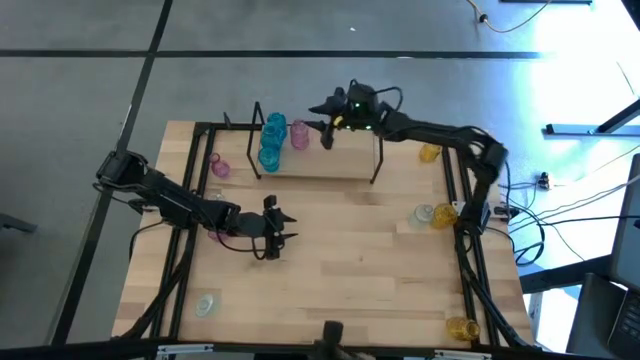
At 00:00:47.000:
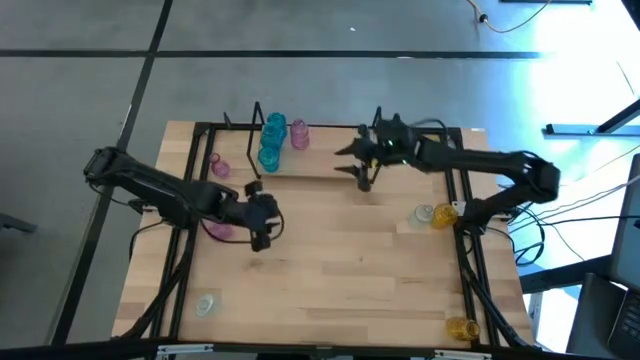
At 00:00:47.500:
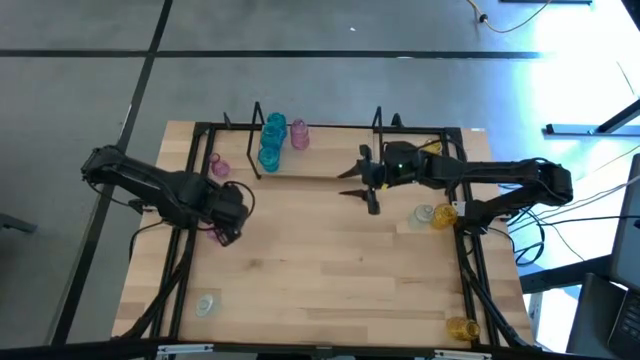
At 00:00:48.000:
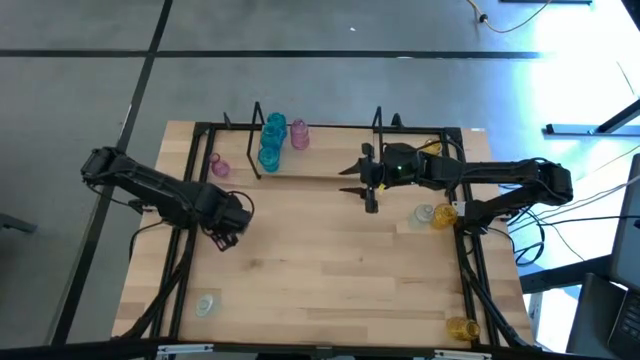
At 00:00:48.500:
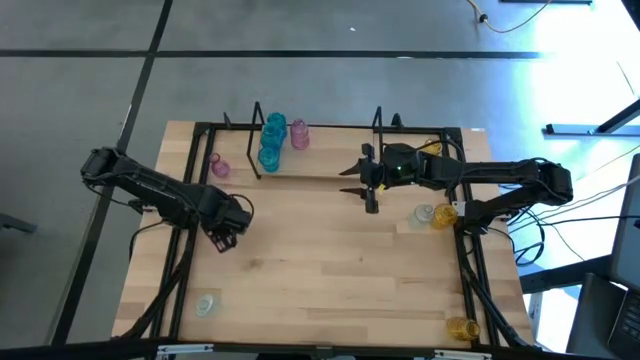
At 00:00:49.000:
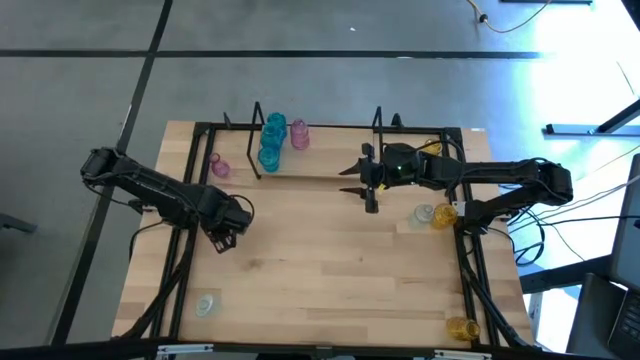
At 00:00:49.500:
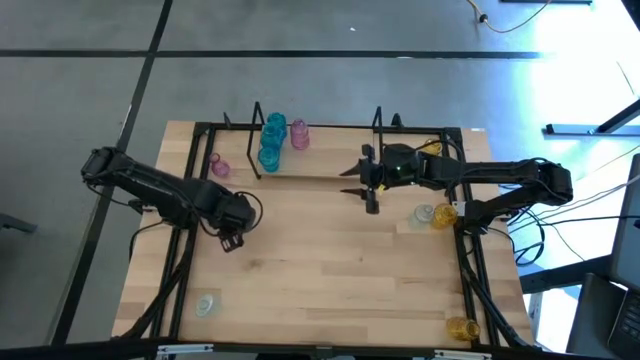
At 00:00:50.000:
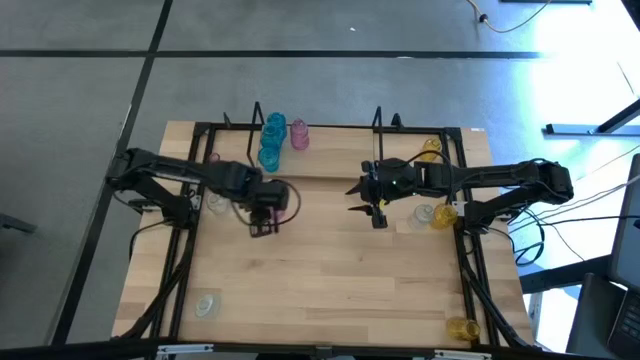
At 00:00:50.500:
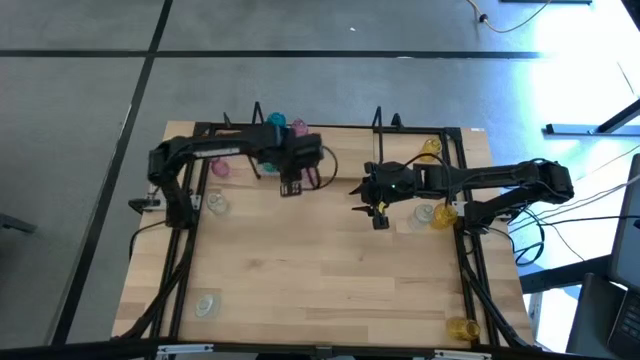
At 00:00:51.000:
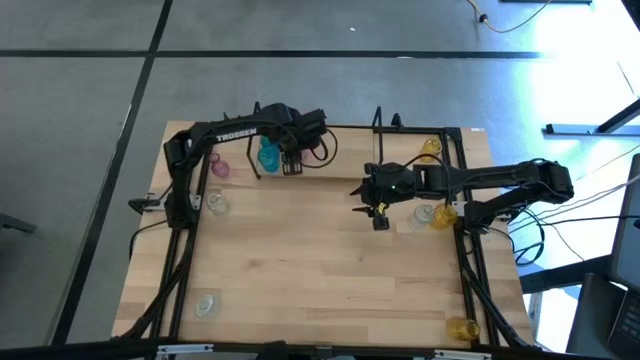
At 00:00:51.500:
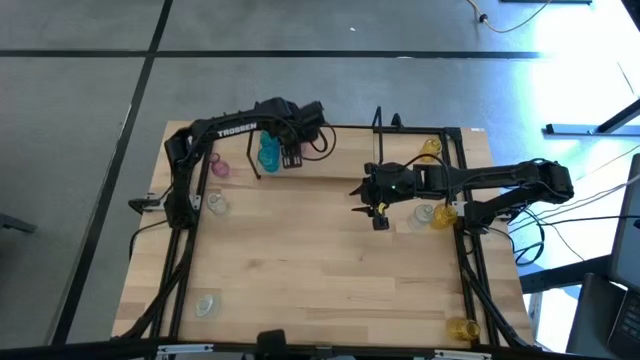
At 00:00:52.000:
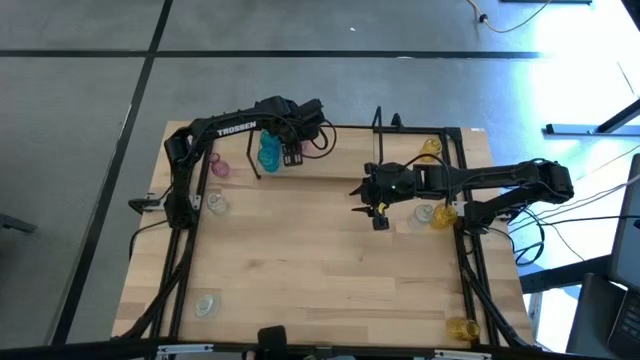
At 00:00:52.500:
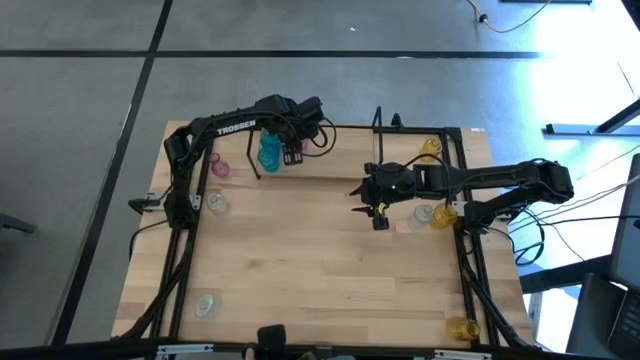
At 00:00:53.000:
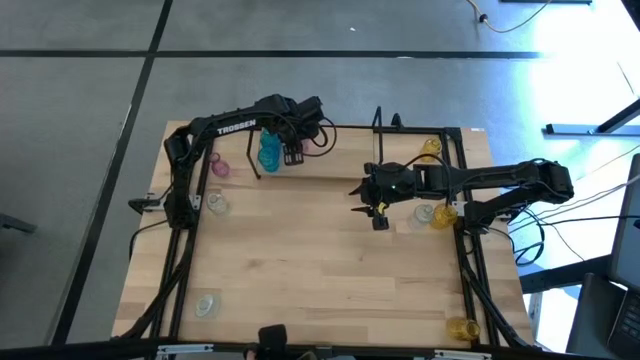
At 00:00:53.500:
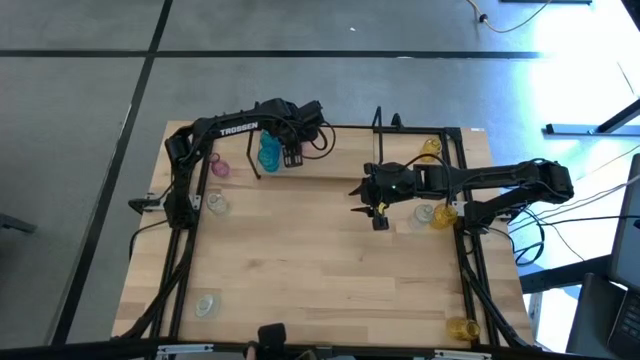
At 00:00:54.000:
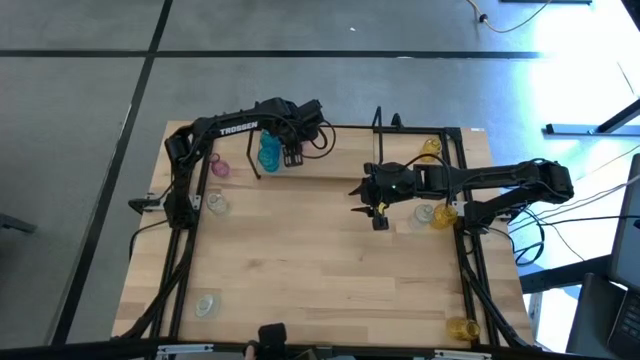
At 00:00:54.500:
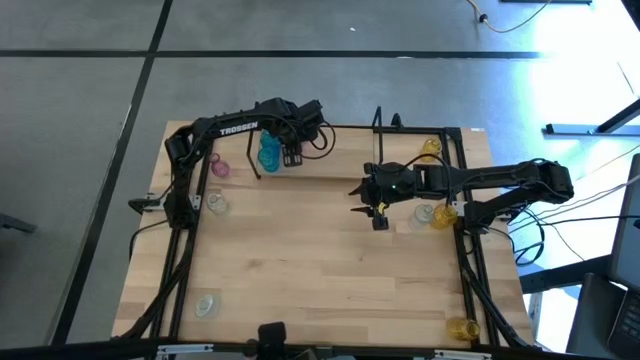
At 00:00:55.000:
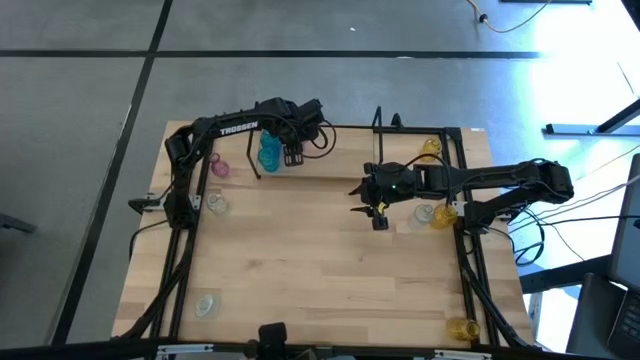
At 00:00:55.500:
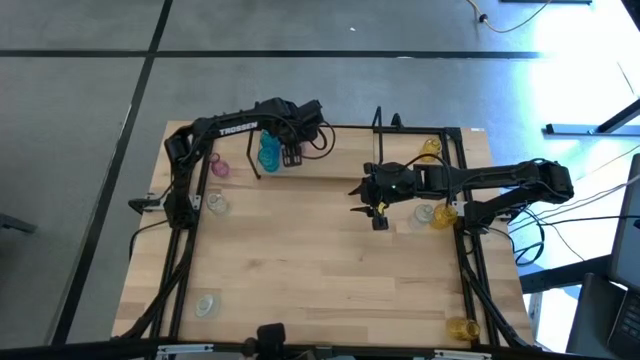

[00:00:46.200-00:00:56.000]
Task: sort vases onto shelf
Put the bottom pink vase on the shelf aligned with the other pink vase

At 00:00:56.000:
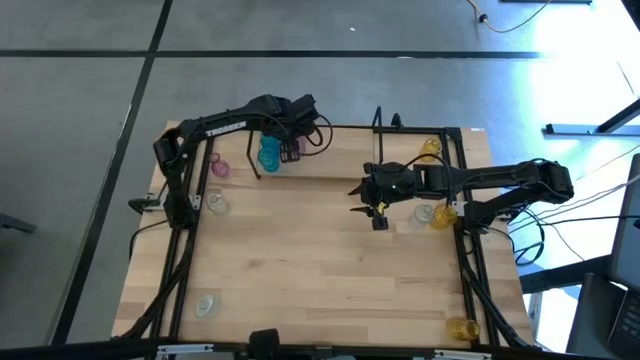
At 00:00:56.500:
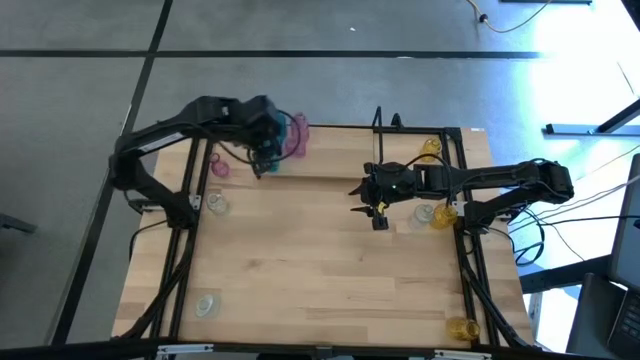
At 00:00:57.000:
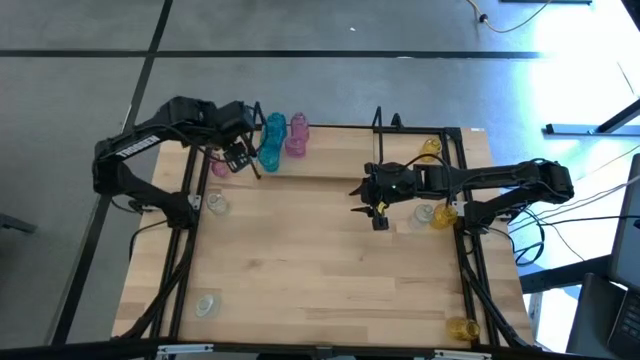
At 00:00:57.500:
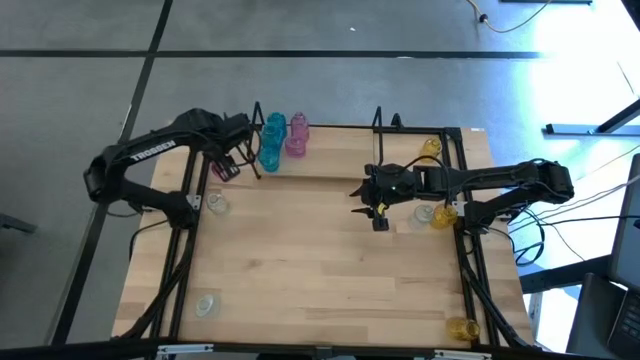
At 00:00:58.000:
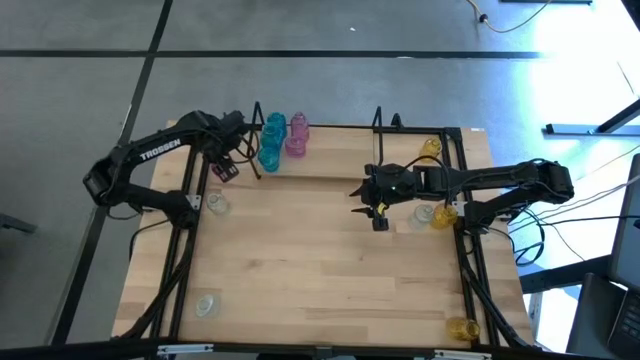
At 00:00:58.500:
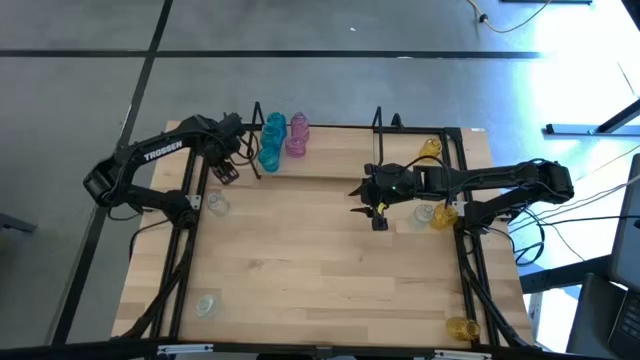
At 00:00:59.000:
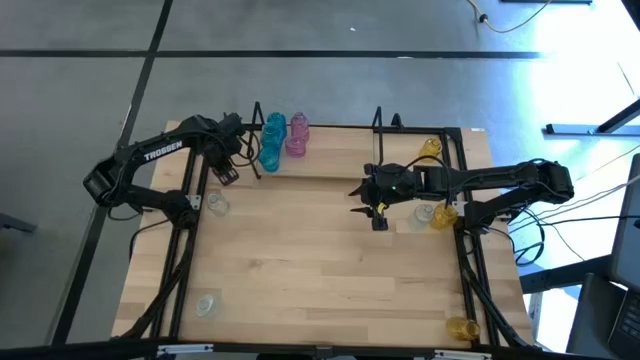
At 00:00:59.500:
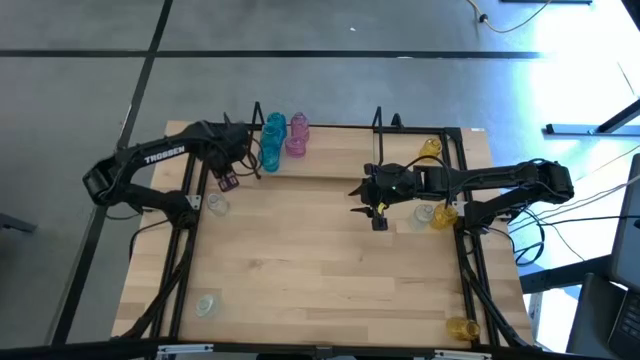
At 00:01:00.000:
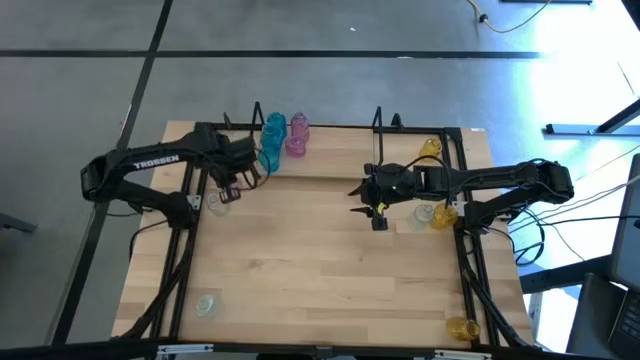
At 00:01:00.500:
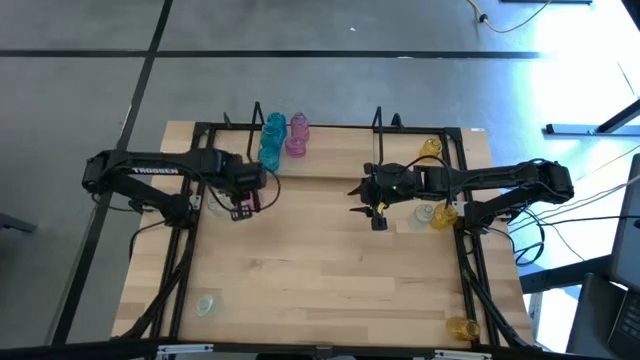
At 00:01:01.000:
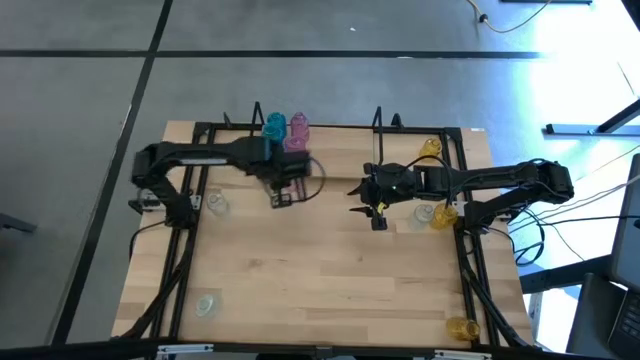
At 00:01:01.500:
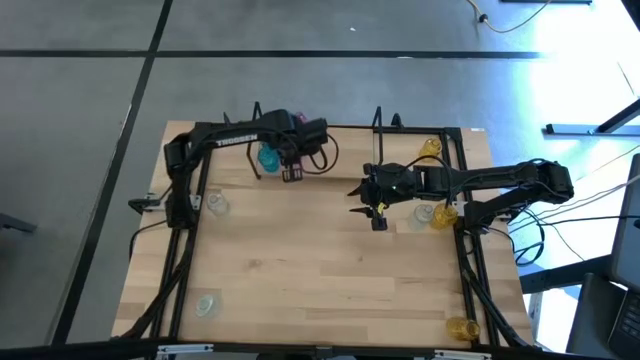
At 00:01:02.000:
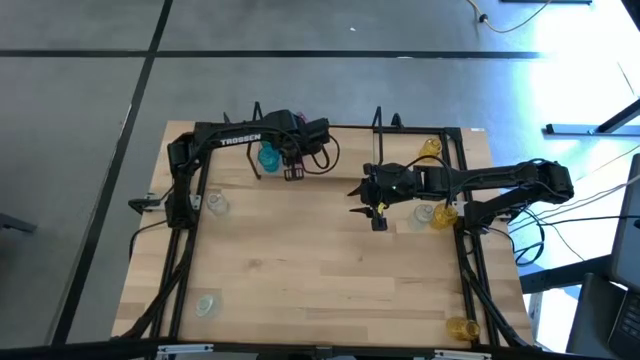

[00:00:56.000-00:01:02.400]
Put the pink vase on the shelf aligned with the other pink vases

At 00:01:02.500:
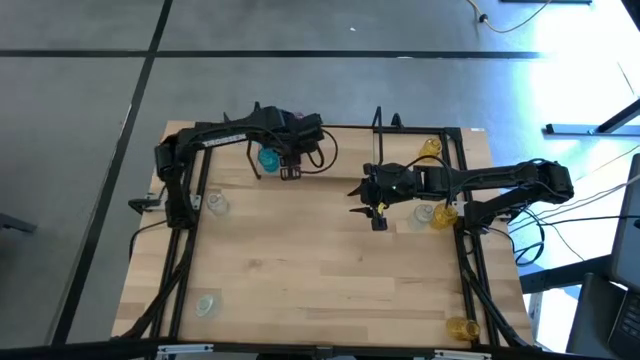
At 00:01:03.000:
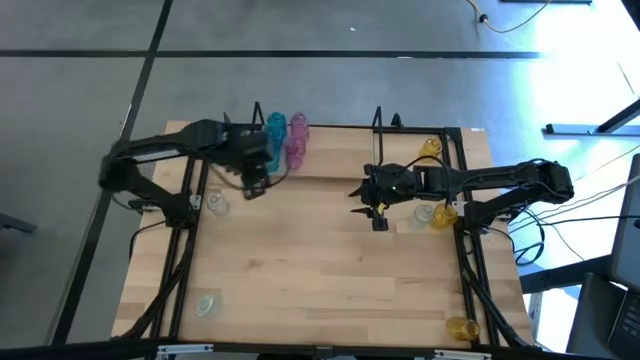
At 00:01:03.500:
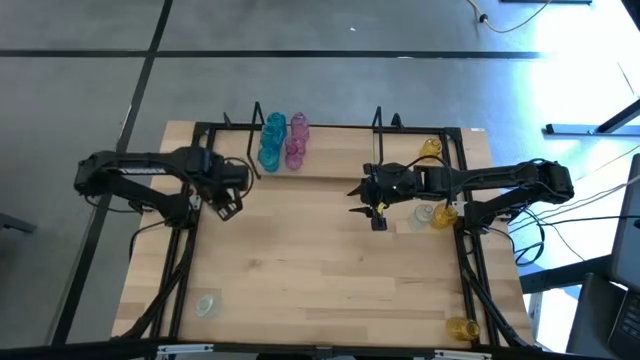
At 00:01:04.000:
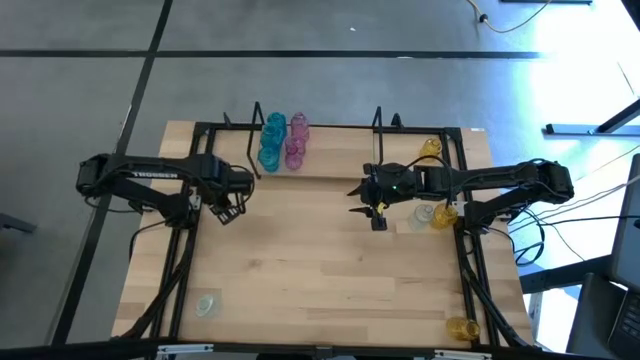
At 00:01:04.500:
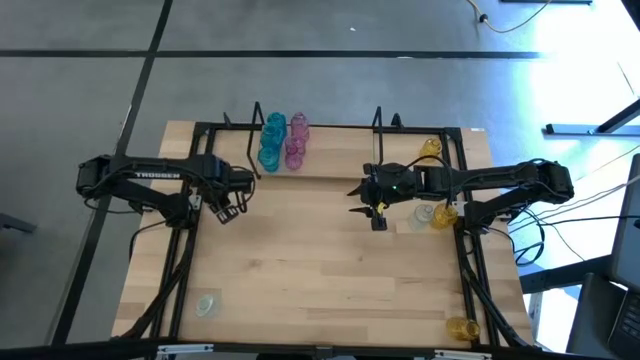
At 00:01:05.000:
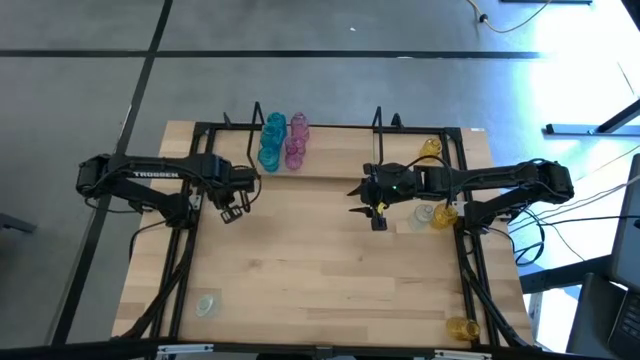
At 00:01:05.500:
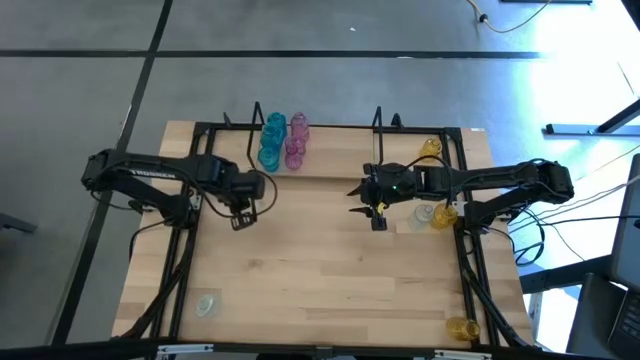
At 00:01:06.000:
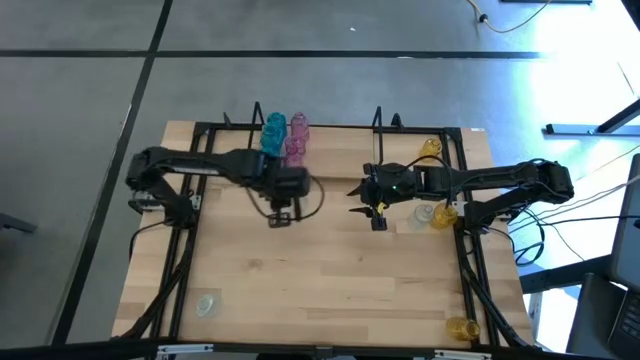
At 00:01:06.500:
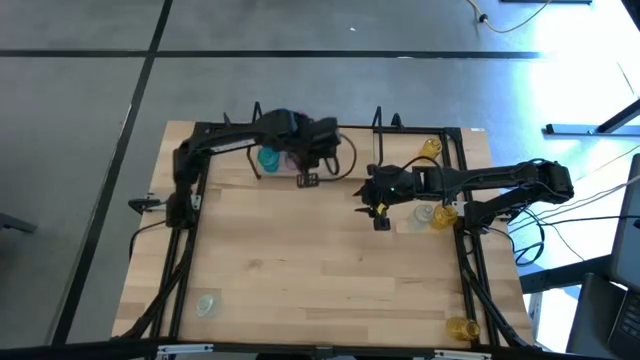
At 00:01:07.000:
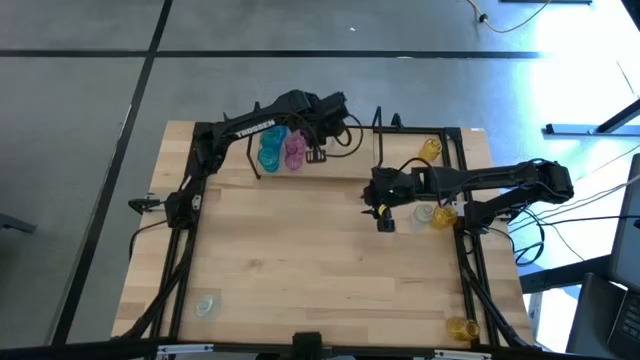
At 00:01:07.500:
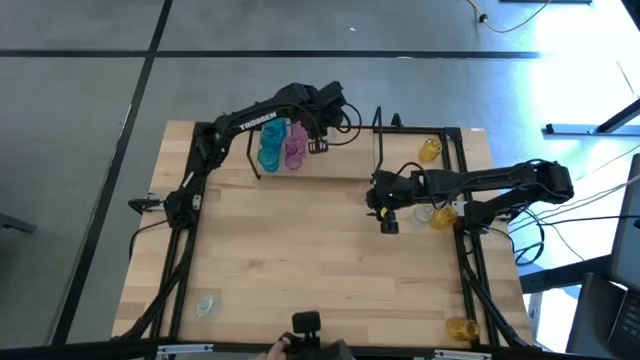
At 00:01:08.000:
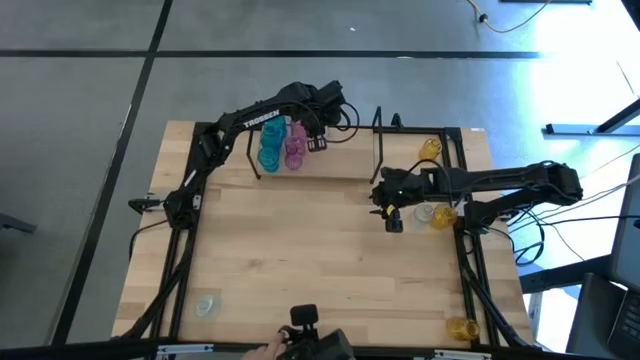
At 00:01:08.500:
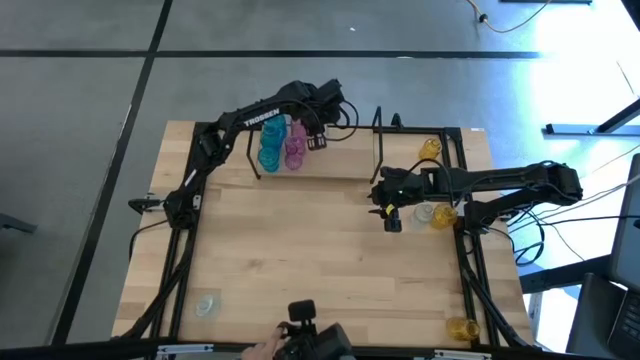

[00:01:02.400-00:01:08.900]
Put the top left transparent vase on the shelf
